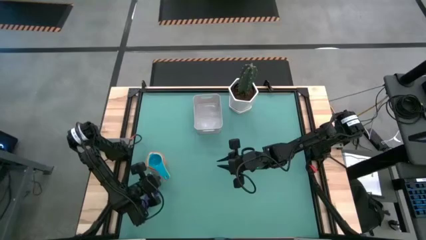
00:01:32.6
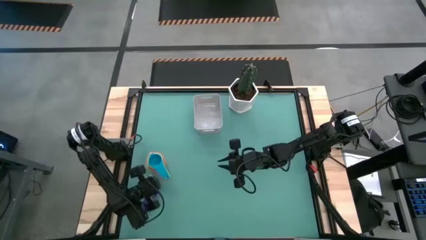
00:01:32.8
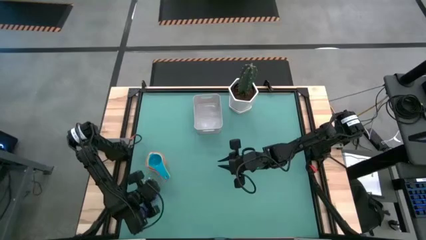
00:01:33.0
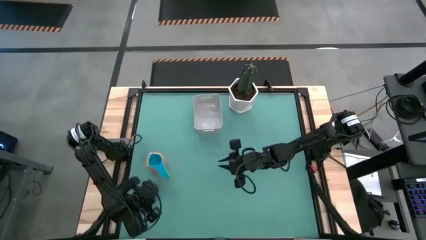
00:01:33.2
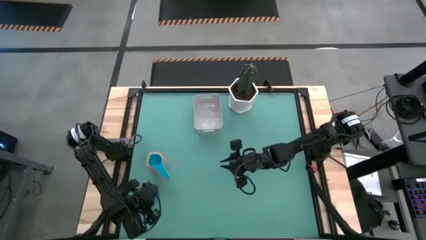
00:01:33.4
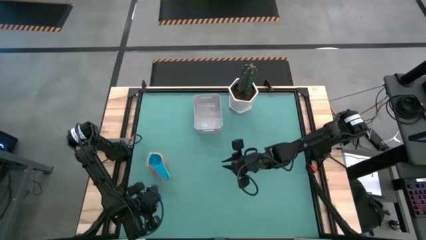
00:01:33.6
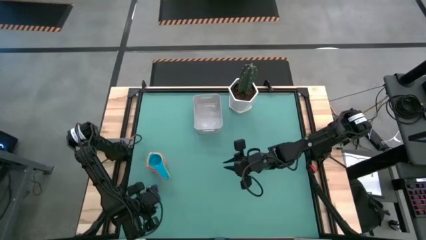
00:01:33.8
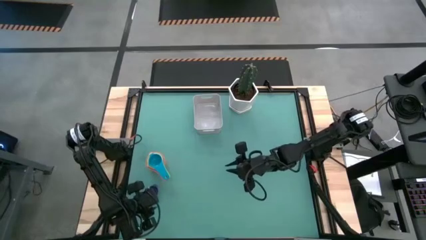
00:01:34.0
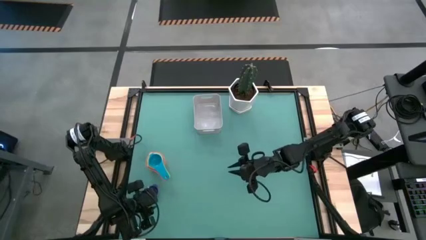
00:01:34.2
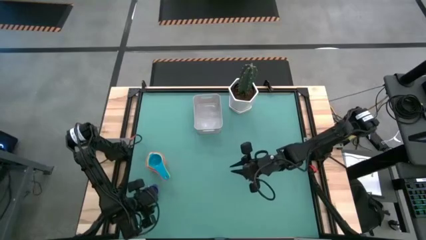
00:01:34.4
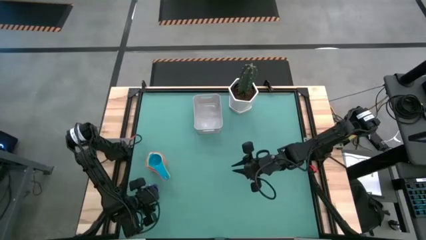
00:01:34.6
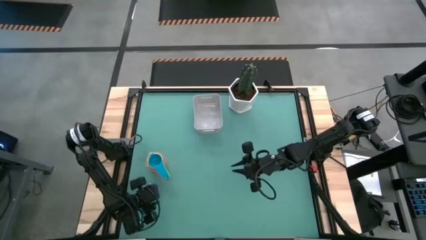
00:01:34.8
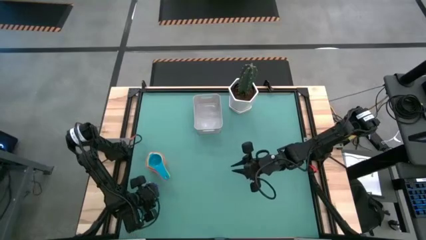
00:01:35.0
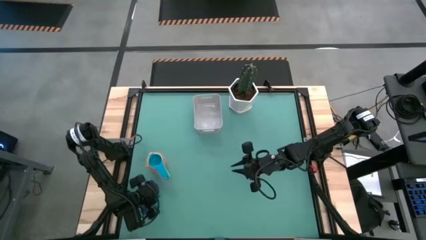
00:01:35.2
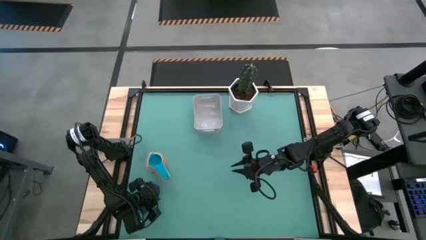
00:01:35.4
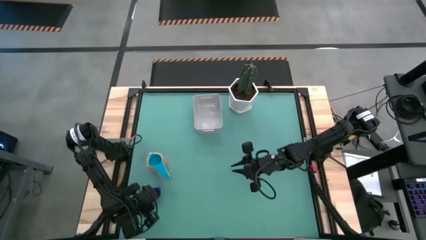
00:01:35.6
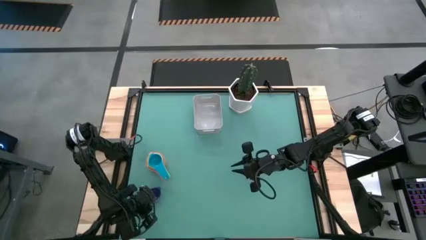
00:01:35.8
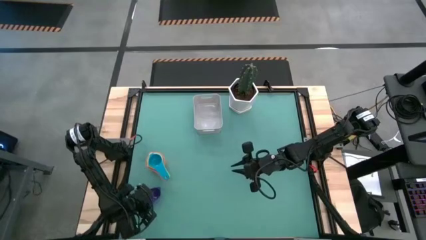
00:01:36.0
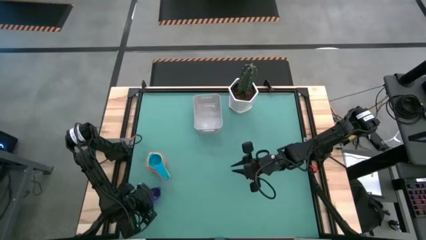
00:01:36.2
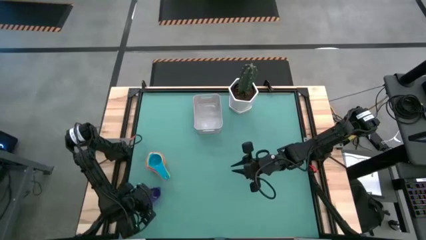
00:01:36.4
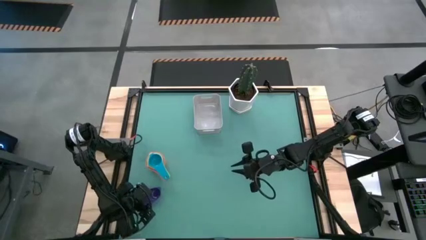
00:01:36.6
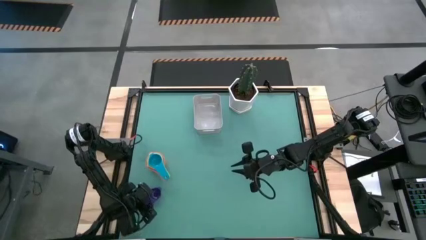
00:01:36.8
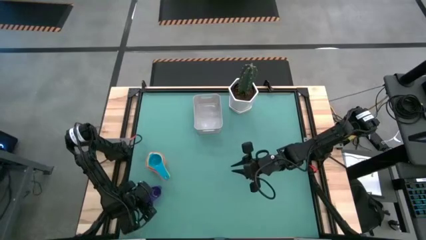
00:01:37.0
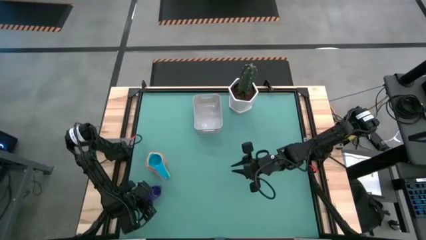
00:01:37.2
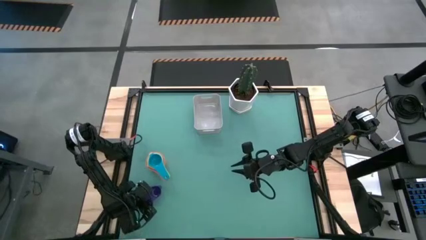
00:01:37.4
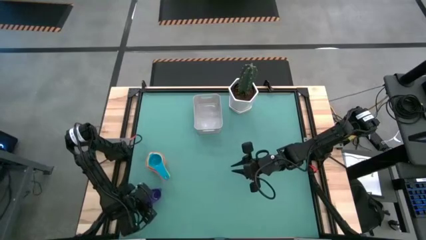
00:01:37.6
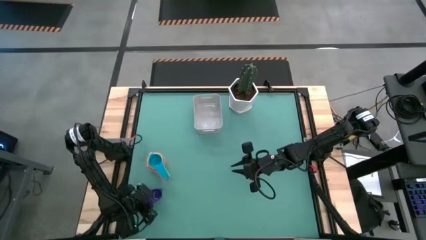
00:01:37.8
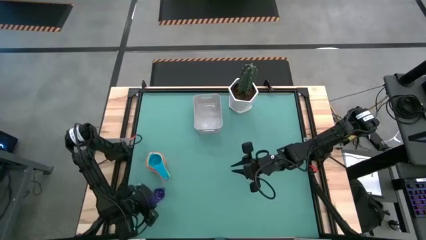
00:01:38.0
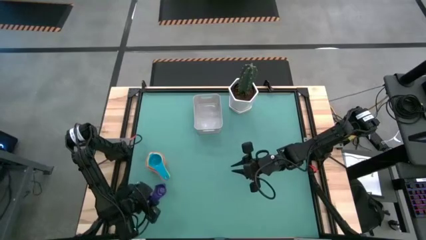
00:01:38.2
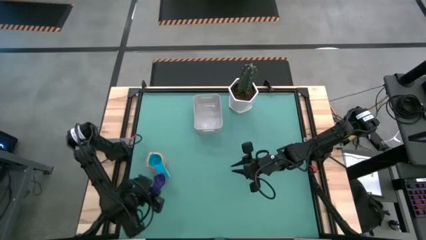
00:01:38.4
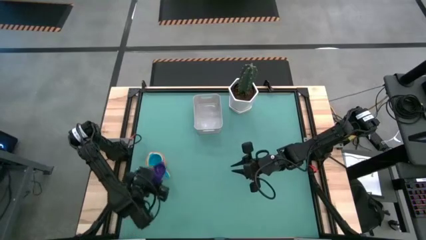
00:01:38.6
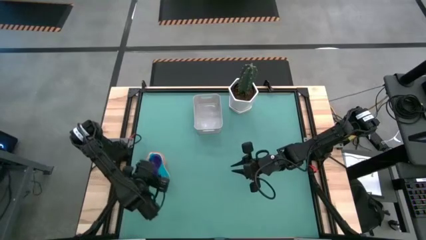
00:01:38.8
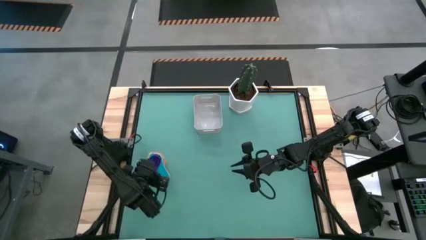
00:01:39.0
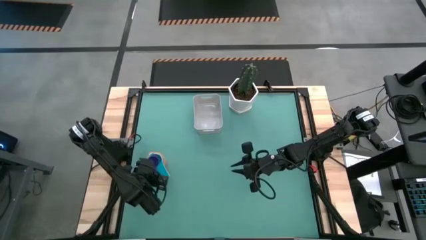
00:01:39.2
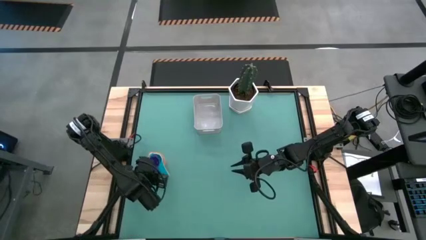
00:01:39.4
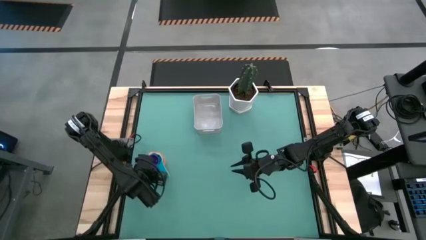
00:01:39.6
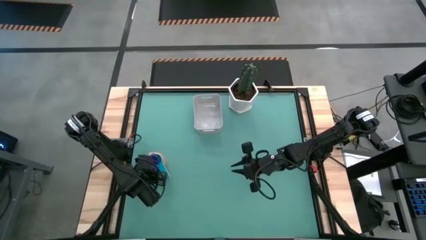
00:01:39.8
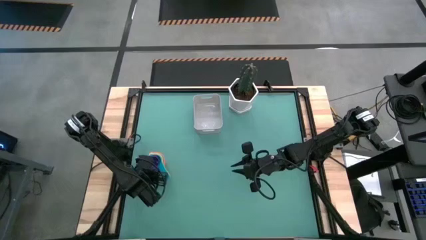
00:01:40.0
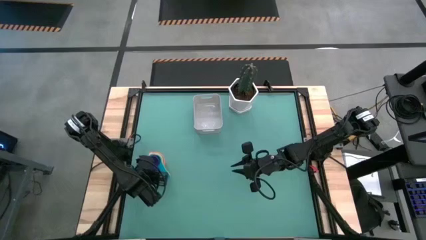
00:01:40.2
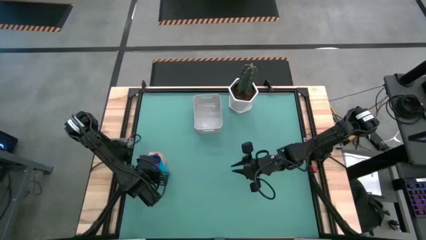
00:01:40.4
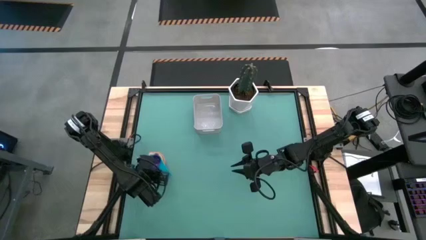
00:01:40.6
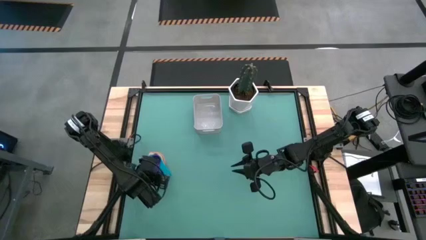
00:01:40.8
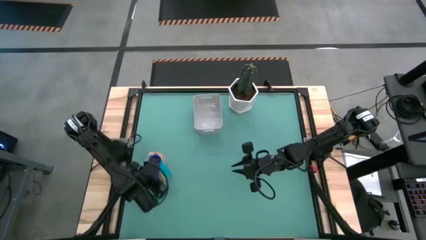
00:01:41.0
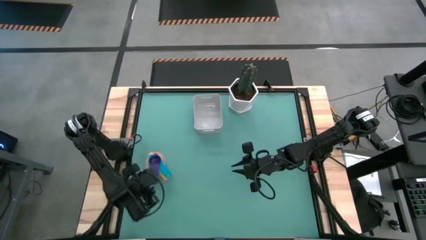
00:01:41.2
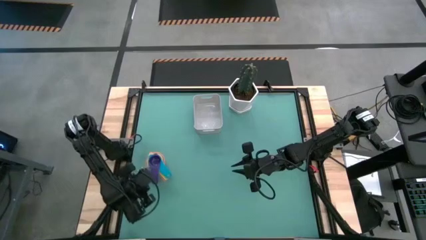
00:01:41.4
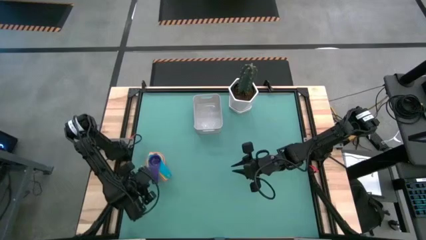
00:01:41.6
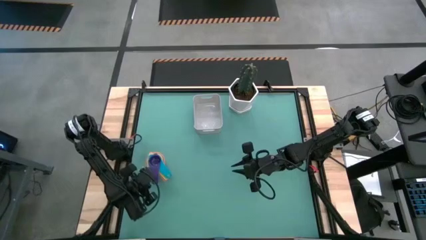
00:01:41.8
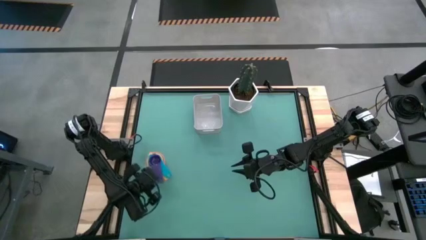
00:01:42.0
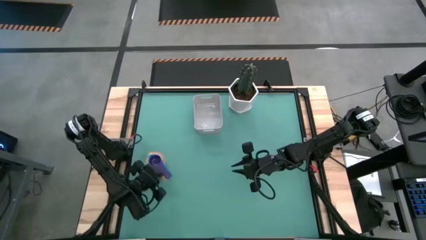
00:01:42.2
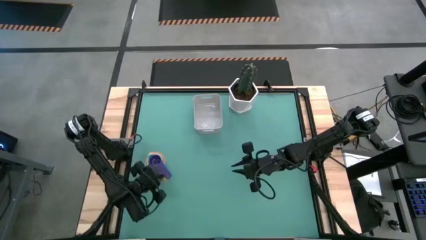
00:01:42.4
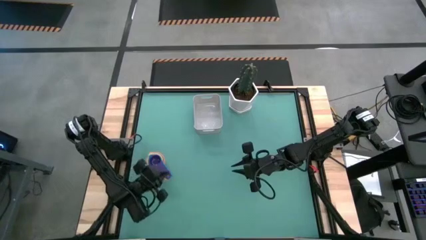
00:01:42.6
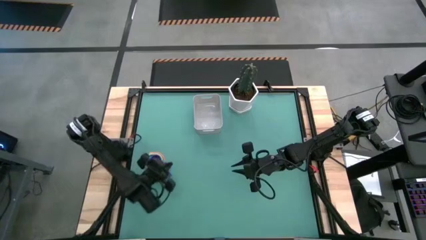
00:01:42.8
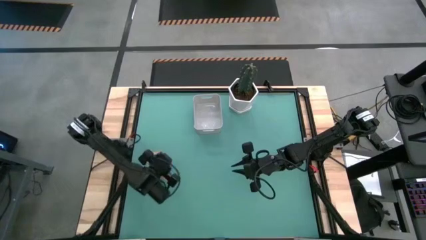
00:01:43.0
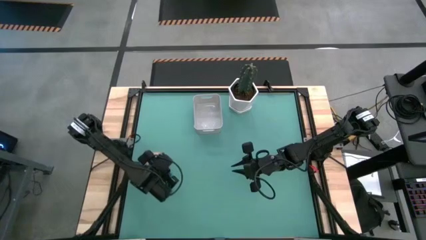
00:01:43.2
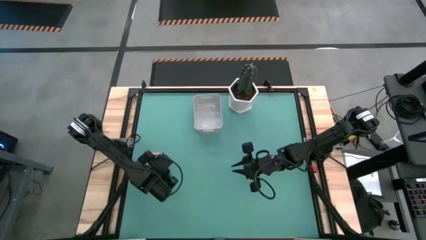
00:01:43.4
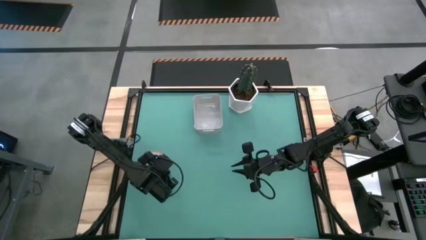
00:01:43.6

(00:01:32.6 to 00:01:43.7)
Task: Nest measuring cups in basket
Stack the violet measuring cup on top of the blue measuring cup

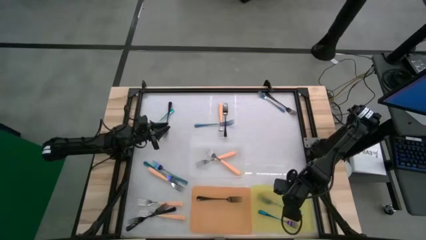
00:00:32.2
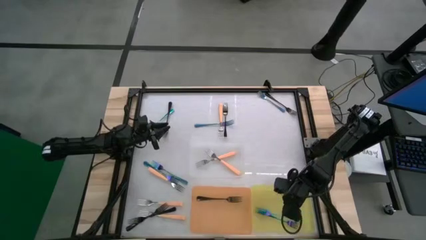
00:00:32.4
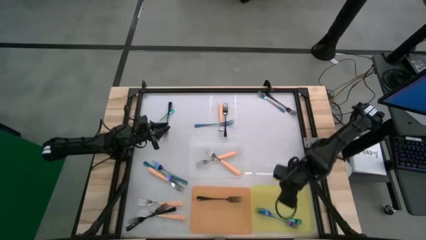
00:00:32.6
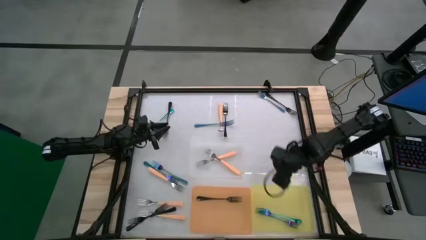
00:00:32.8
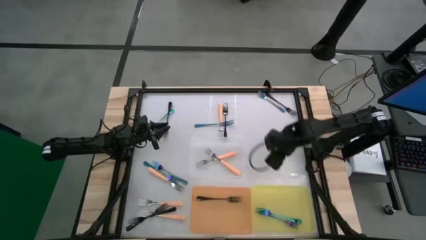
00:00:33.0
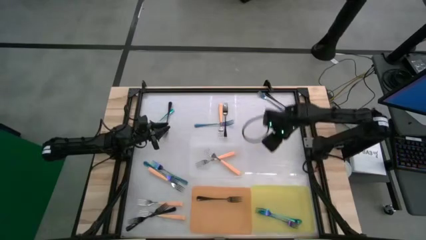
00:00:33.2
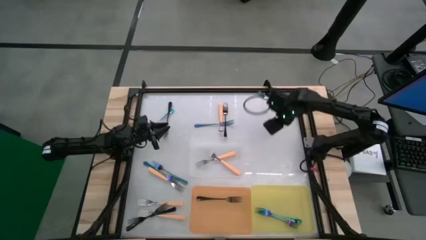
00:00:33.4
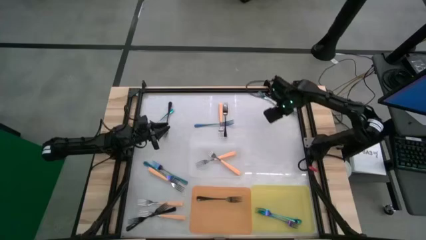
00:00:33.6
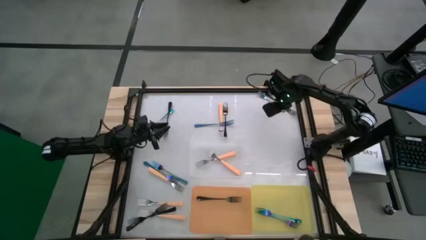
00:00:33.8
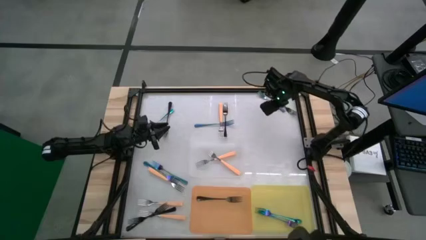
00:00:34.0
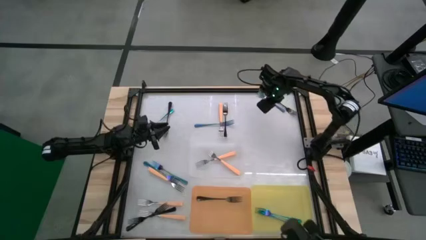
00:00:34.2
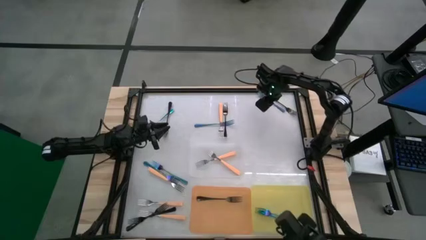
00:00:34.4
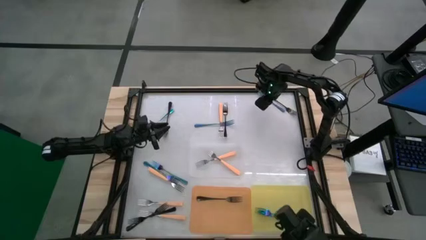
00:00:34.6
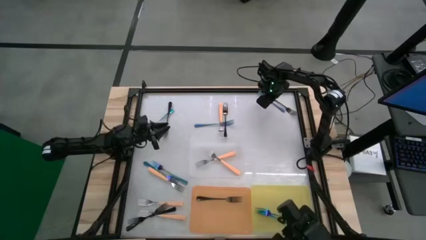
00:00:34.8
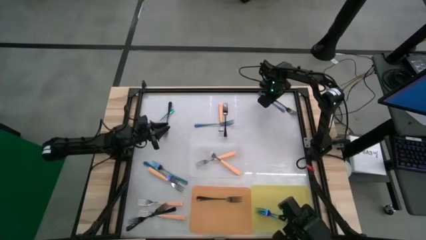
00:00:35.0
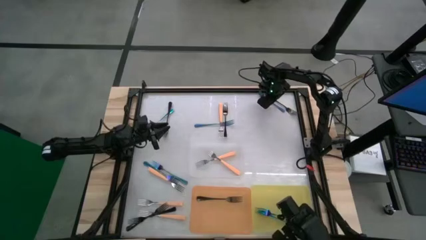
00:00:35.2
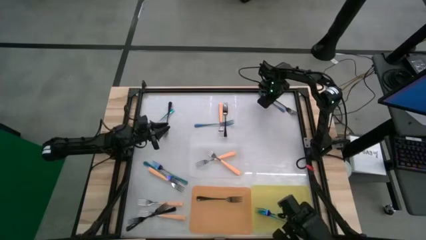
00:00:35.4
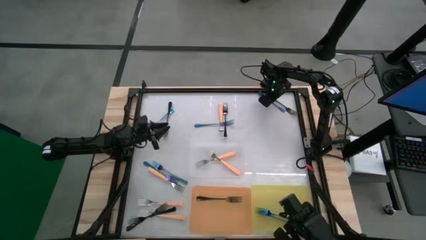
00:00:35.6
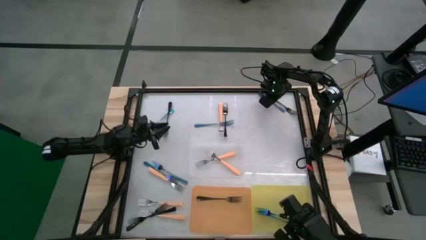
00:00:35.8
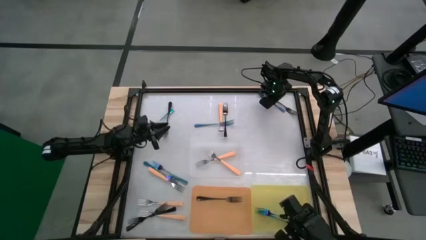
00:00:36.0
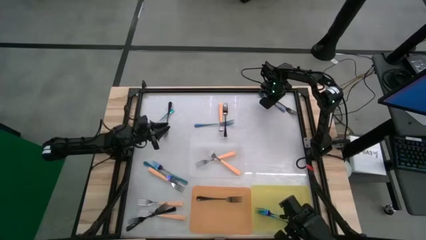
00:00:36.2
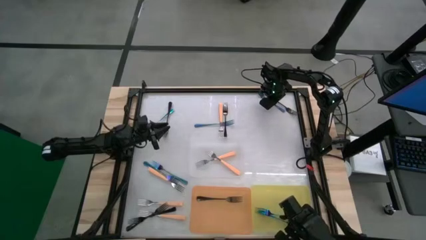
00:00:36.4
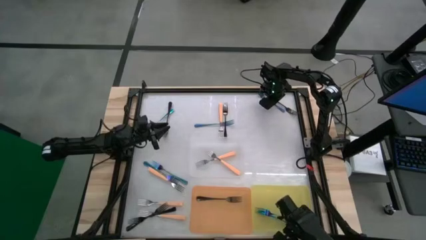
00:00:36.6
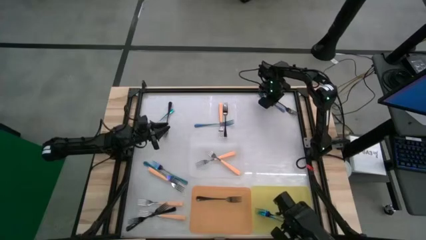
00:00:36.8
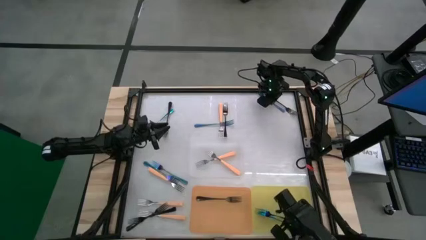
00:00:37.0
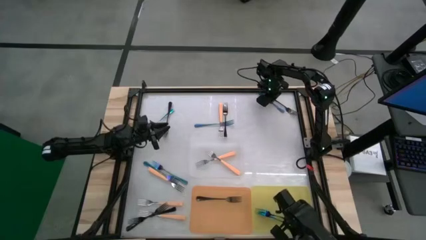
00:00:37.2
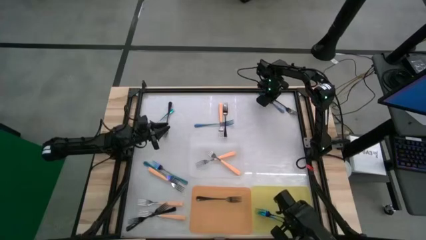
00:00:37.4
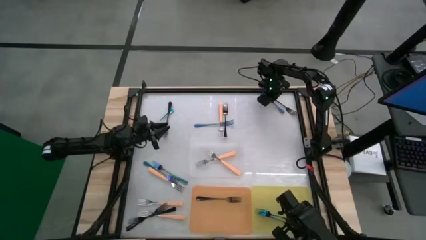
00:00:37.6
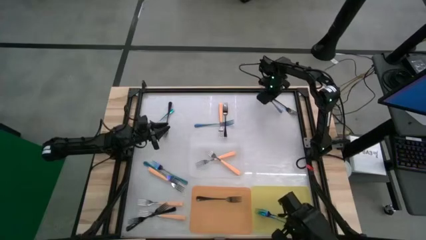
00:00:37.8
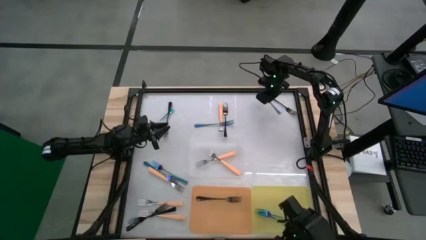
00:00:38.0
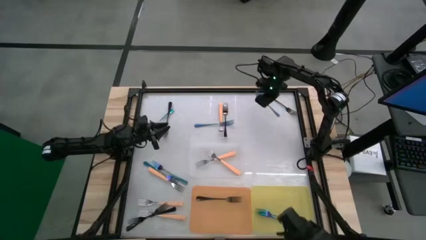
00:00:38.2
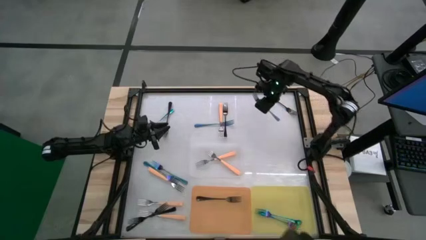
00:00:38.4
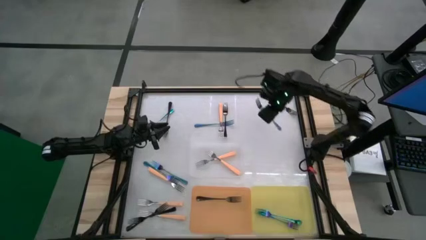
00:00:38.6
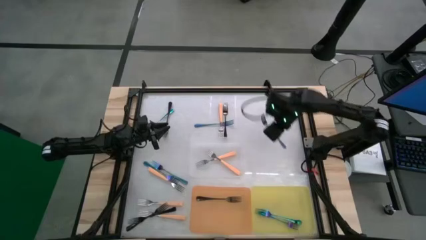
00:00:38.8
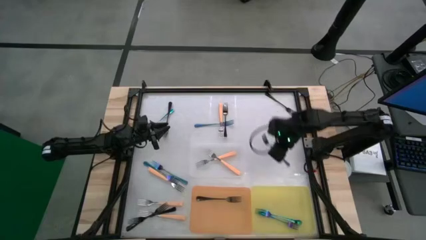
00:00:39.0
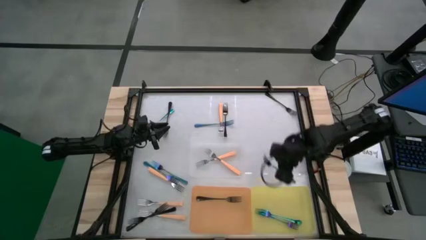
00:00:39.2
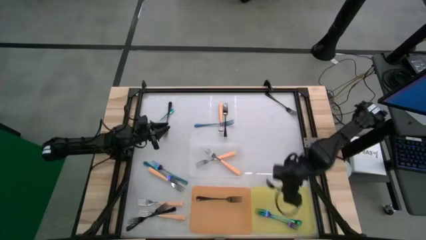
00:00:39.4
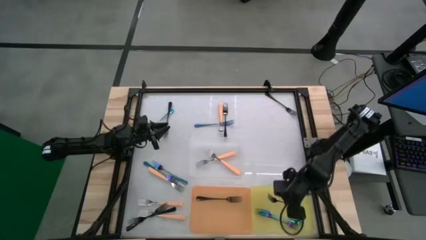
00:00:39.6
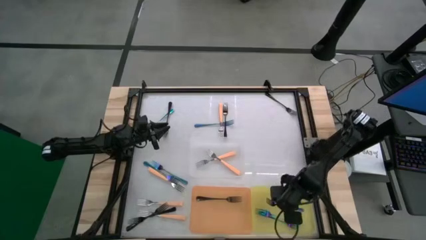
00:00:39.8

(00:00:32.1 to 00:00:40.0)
Task: Sort silverware by color (type)
Put the blue fork into the yellow bin
